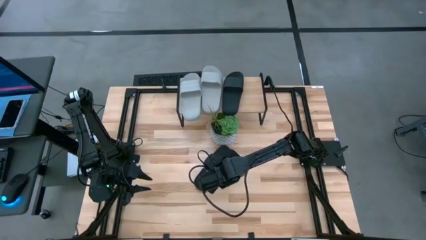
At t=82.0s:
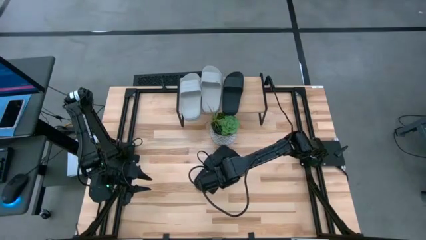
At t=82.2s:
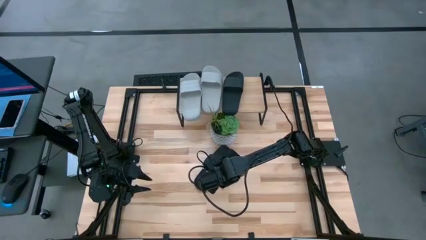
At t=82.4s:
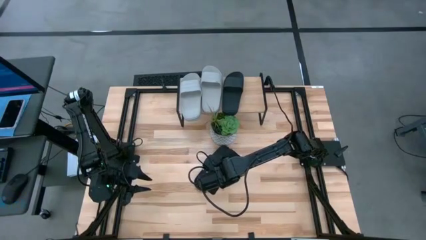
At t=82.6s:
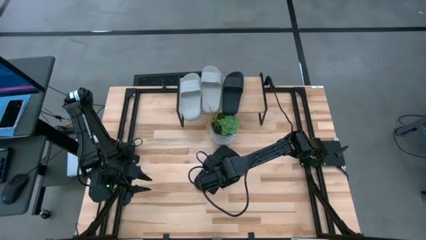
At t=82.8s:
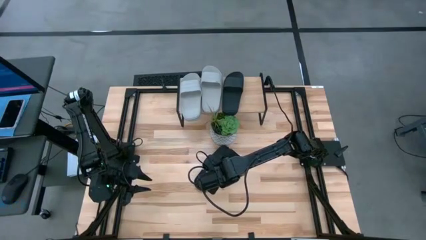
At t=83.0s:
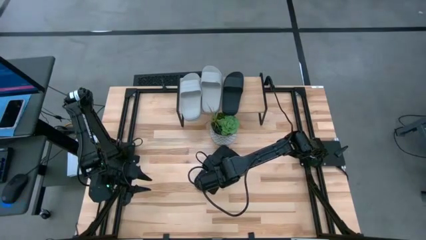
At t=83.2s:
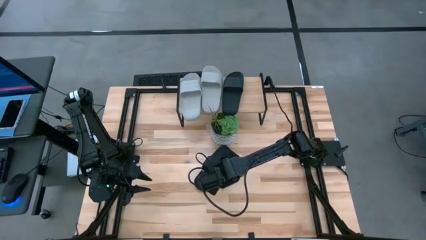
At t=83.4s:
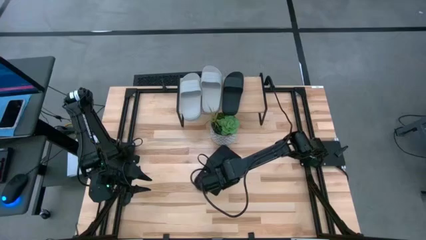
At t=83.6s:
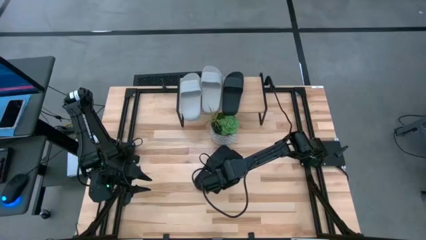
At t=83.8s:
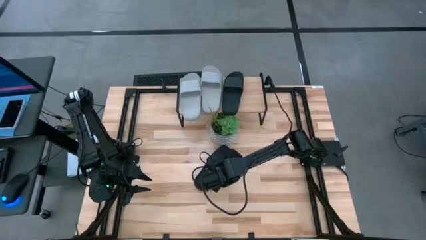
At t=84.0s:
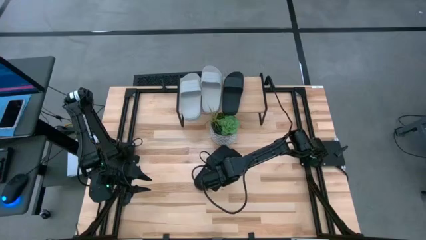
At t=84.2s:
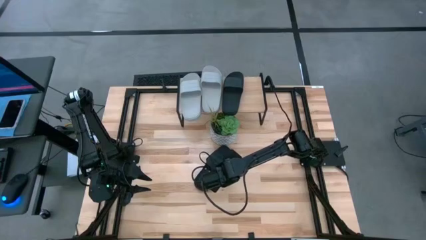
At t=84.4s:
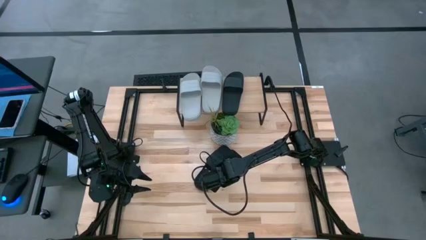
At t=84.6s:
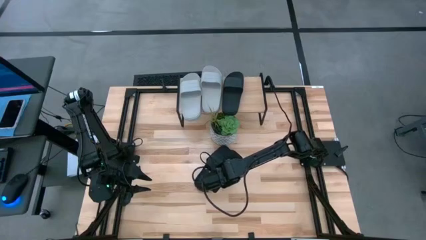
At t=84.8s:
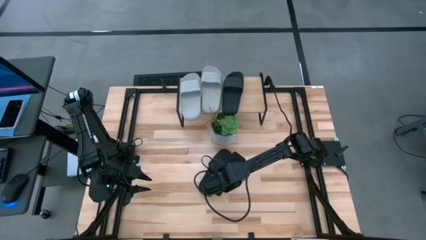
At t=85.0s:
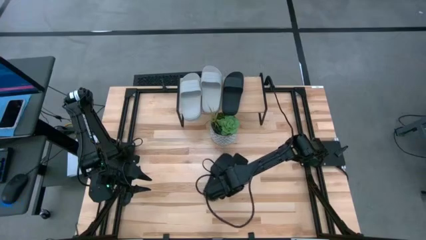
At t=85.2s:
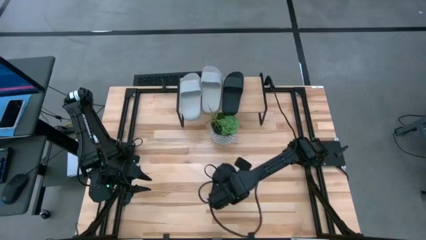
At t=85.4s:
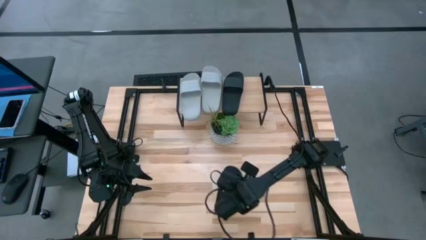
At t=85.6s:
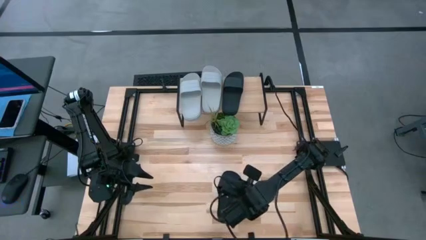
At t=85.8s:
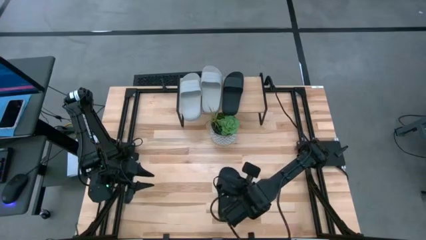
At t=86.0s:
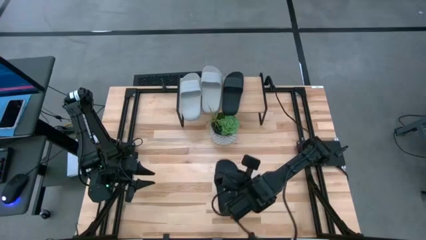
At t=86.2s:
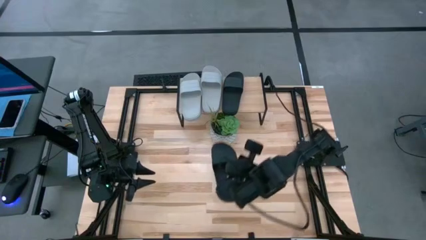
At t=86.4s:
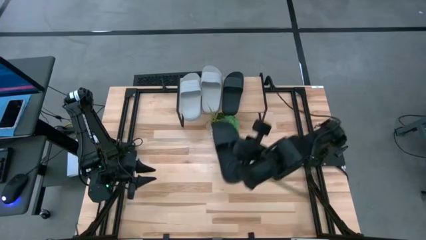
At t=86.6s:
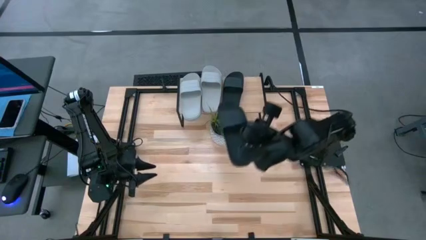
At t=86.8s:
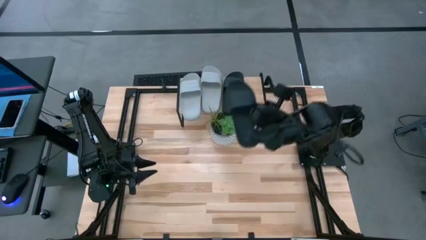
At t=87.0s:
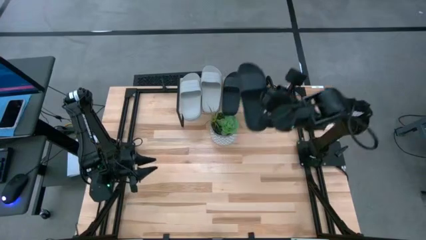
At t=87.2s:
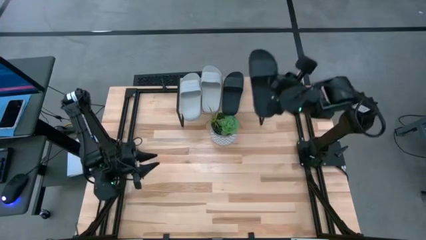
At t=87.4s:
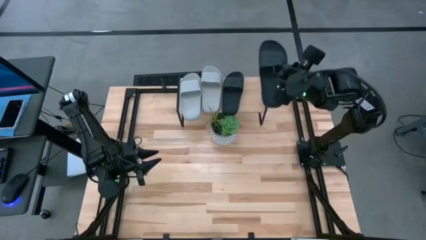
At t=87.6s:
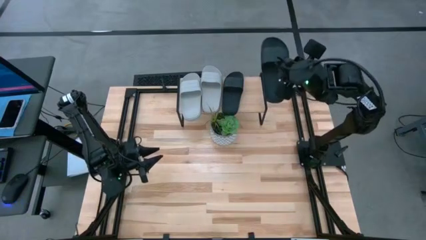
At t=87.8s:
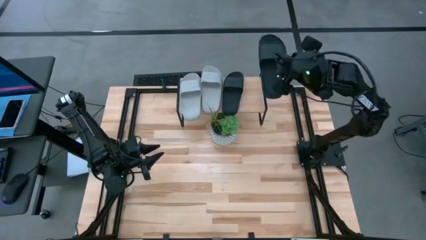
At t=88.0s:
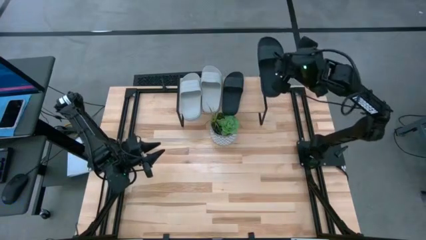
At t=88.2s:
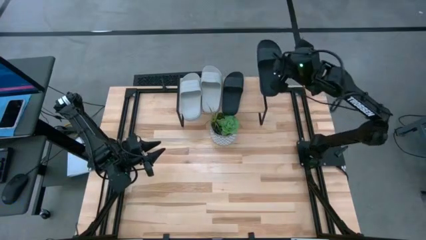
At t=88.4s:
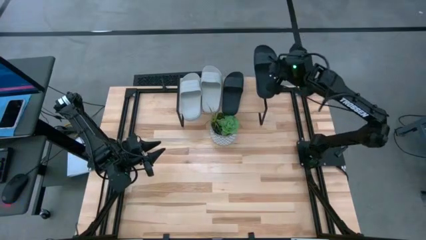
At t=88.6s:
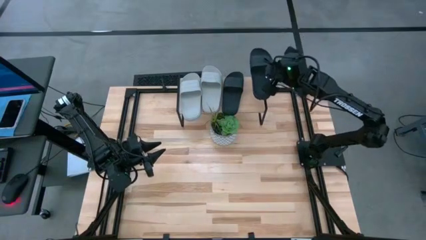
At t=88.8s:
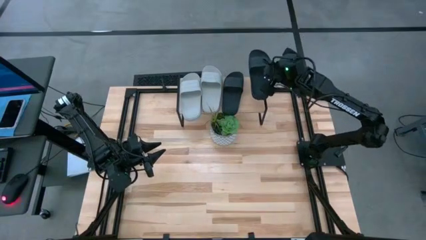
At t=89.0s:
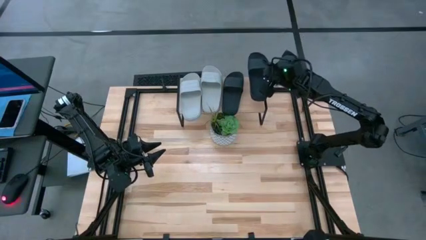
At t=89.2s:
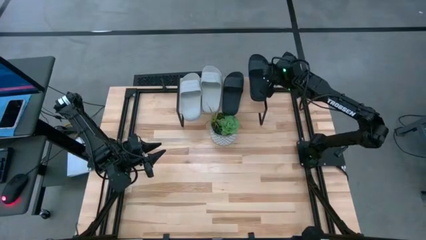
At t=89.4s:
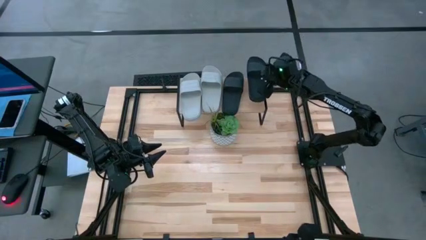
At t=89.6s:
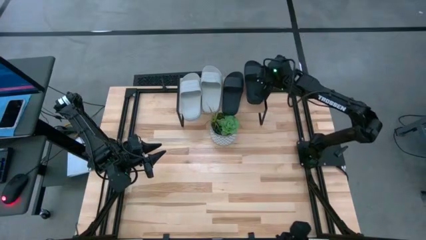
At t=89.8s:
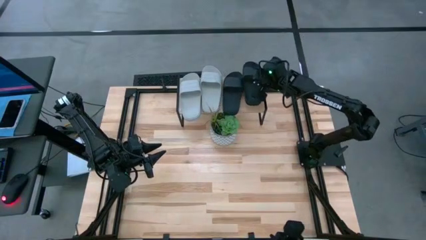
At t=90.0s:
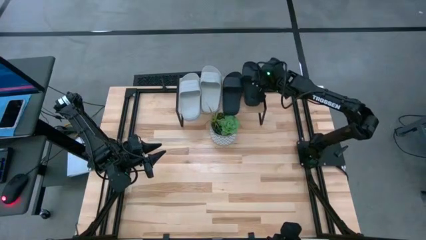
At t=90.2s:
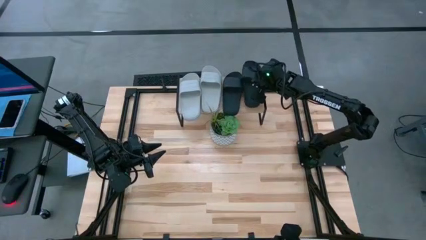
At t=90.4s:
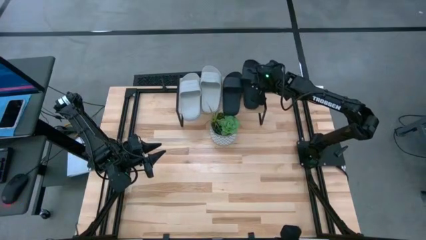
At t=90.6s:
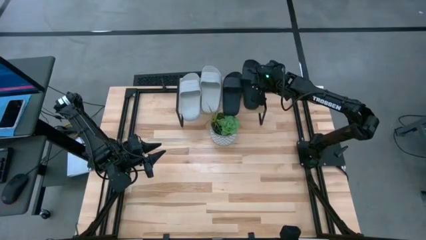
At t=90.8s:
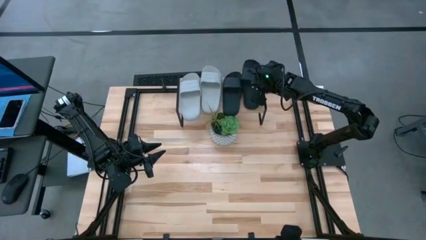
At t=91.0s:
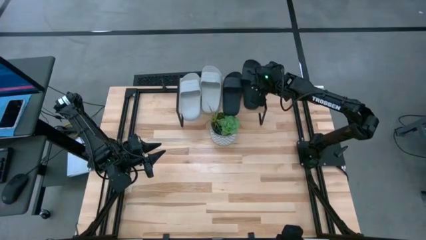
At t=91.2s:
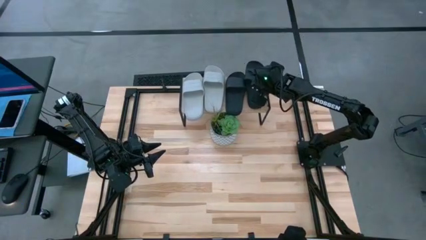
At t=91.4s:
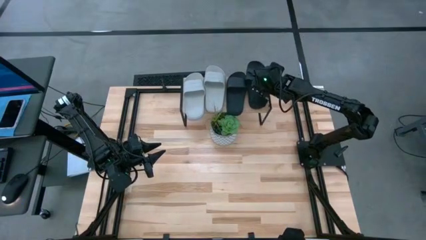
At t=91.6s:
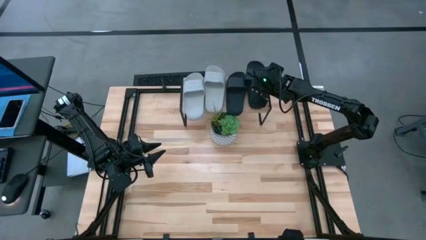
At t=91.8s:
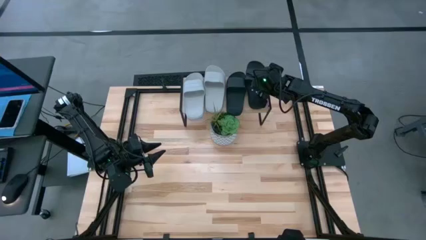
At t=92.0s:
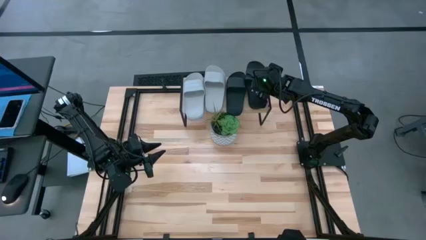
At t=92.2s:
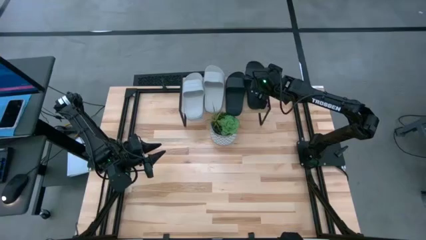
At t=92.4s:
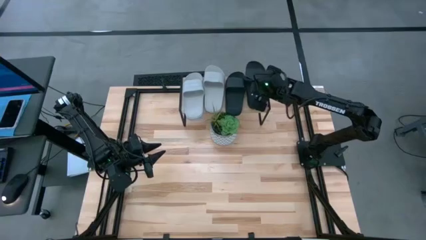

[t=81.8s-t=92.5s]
Task: Pick and place slides into the shelf
Put the black slide on the shelf

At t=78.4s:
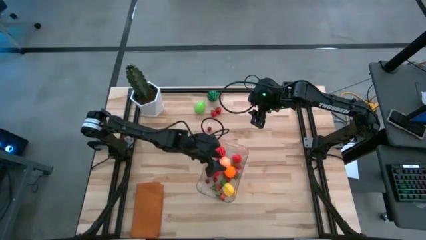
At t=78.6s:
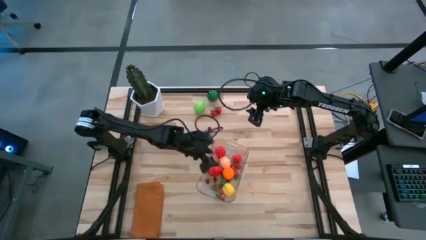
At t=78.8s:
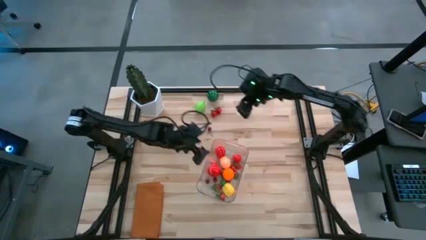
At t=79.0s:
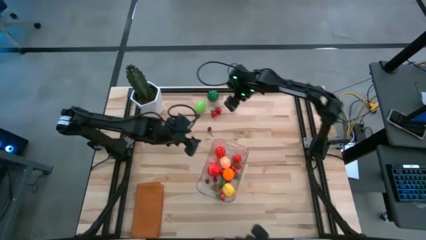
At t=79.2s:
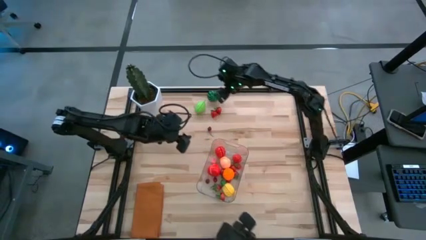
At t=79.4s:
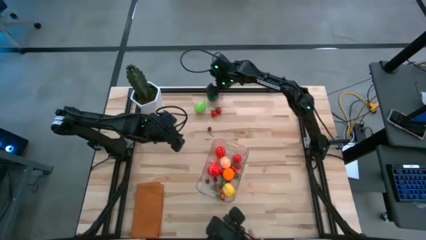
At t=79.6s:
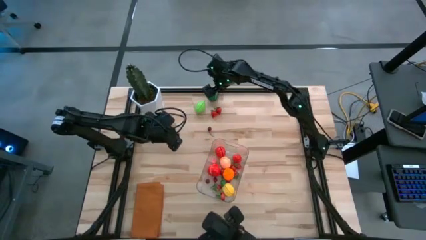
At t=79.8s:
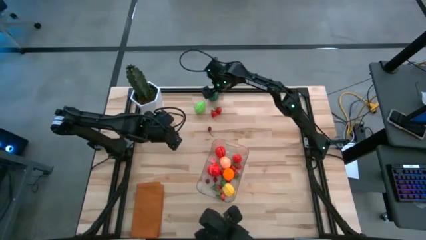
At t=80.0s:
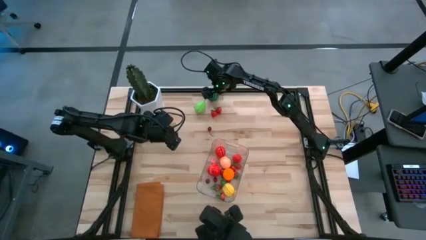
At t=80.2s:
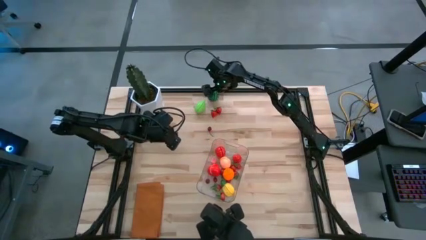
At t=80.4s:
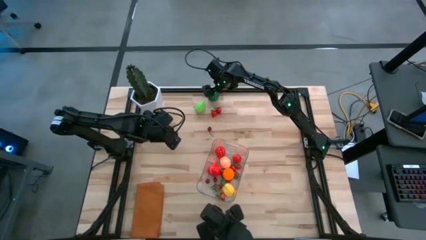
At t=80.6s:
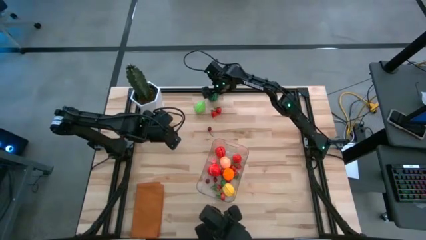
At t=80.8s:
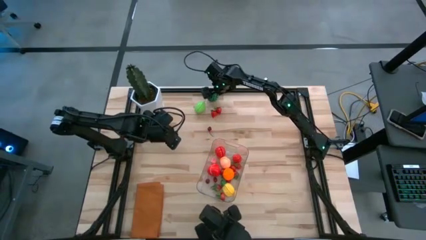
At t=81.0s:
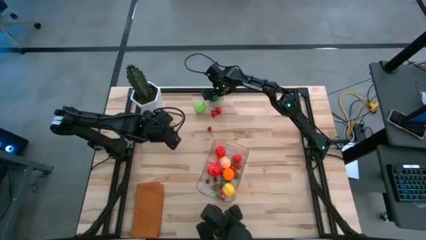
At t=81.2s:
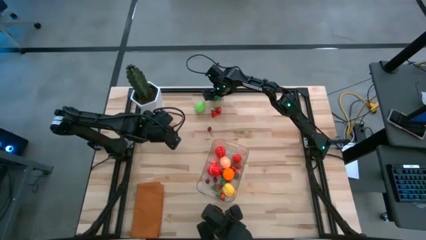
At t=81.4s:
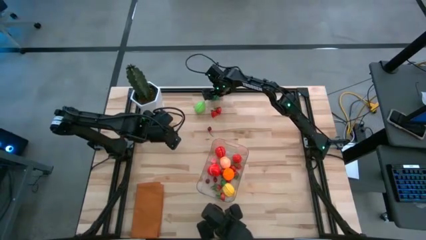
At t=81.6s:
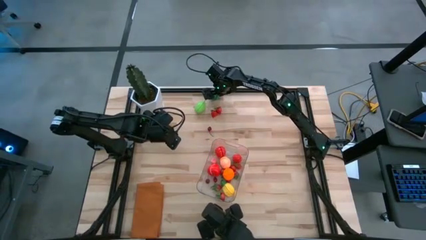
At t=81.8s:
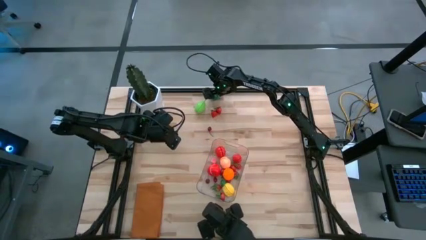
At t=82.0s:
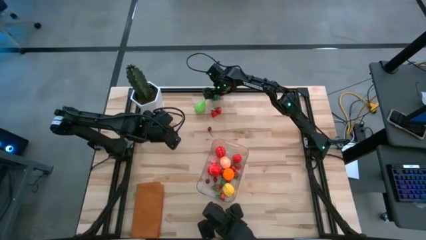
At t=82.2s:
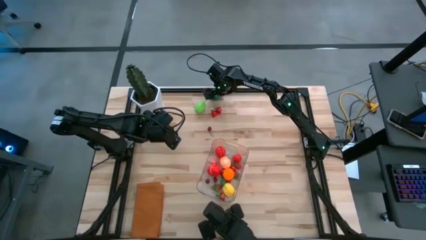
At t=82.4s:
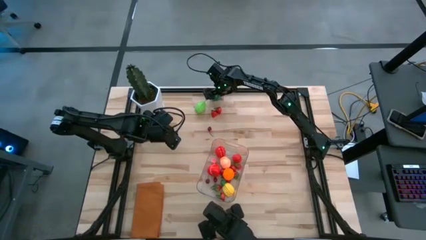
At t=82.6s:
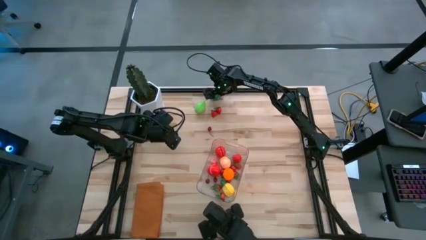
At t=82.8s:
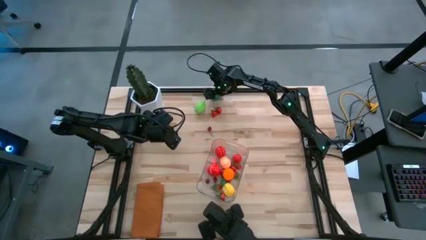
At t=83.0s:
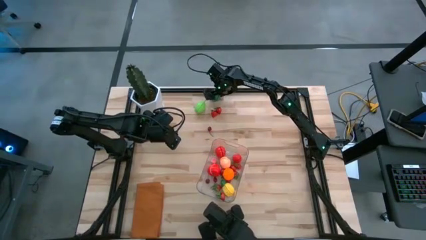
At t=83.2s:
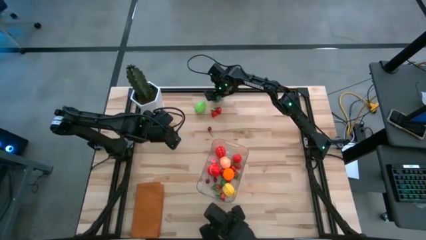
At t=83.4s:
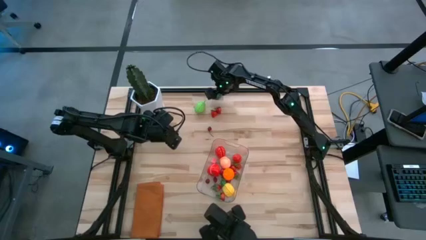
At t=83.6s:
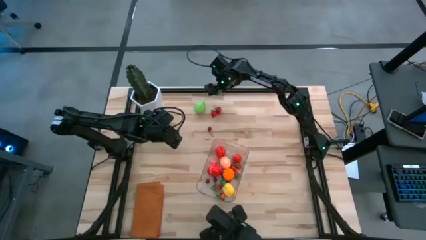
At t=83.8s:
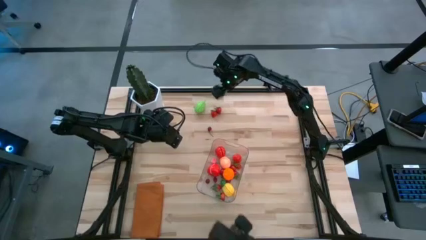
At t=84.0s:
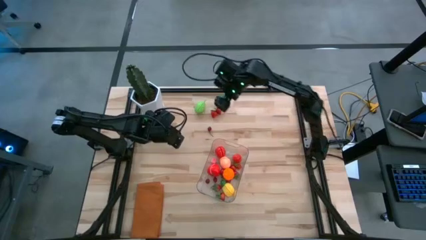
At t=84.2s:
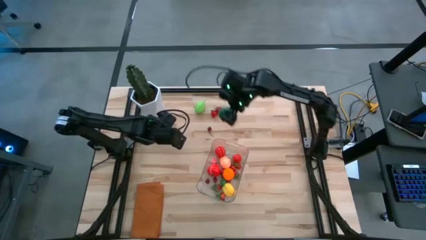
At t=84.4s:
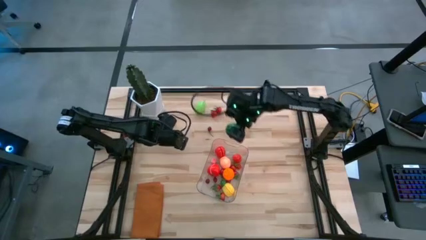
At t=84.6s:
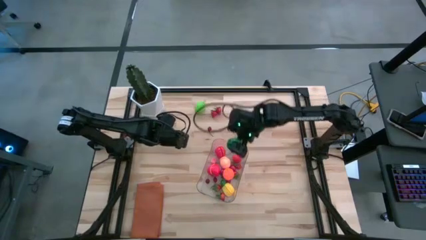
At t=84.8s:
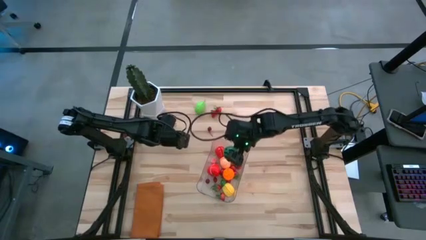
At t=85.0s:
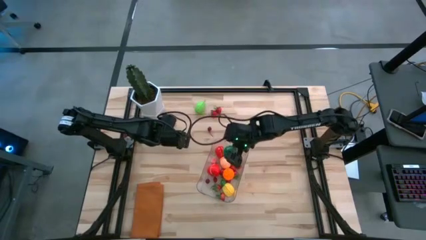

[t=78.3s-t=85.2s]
Task: Pick and placing Produce into tupperware
Put the green watermelon into the transparent bin
